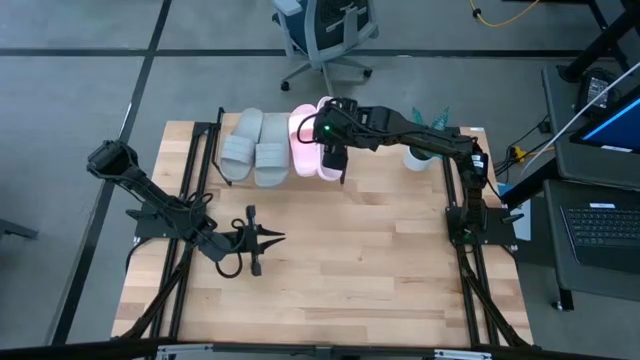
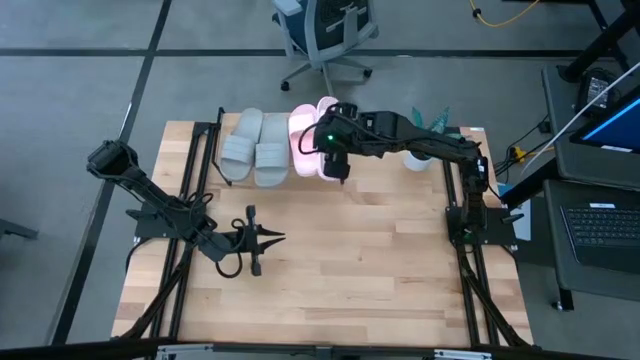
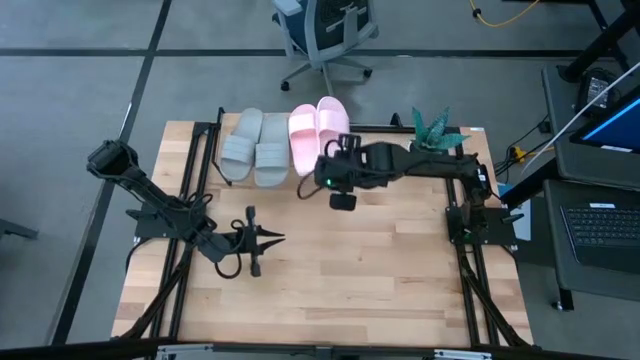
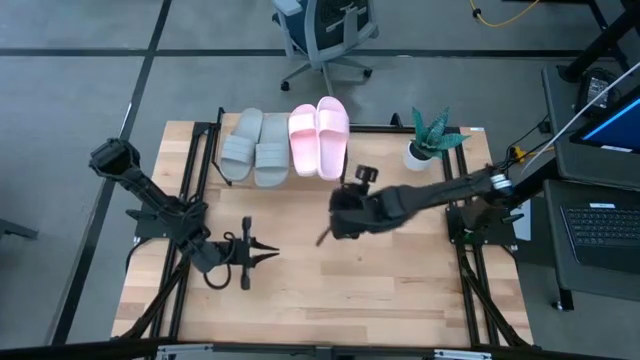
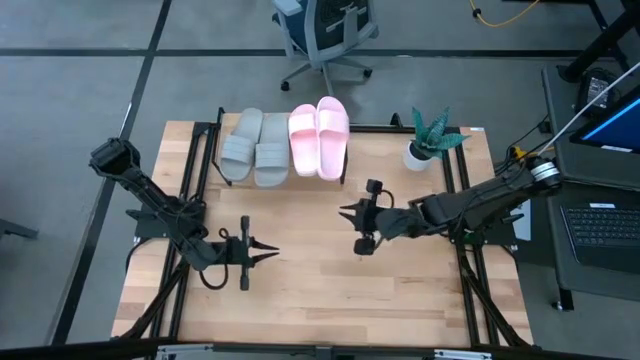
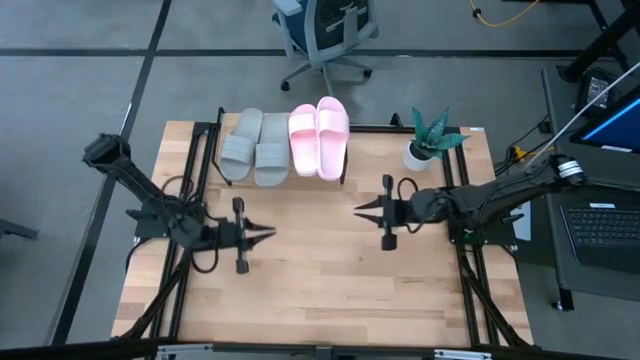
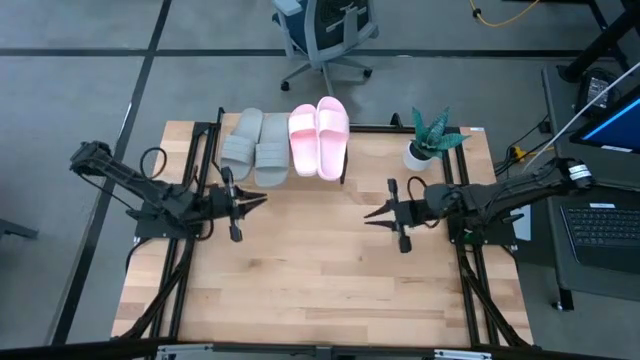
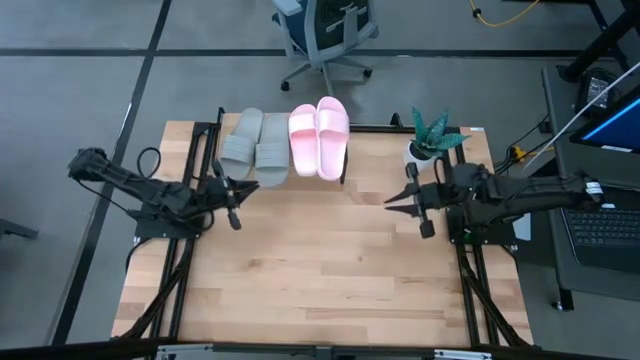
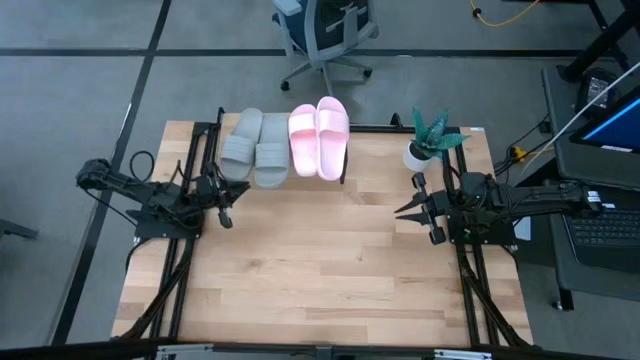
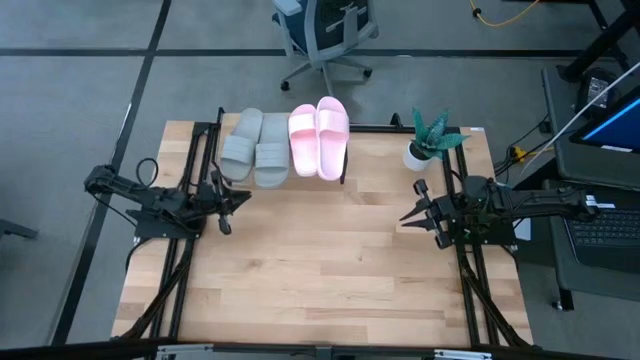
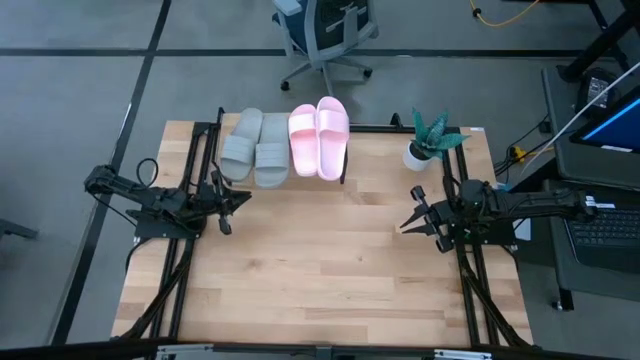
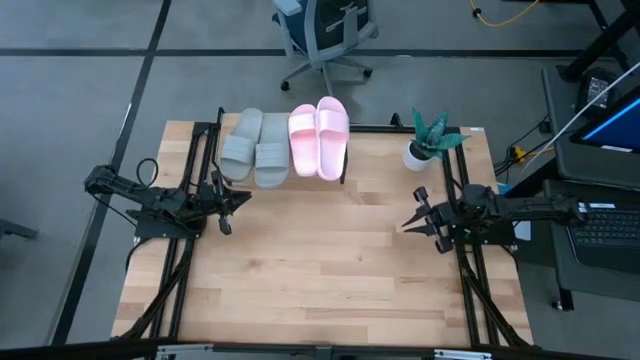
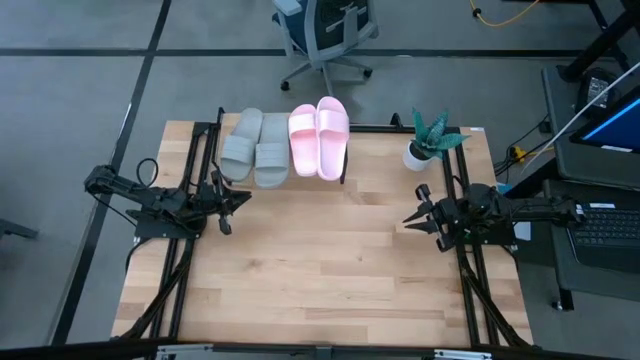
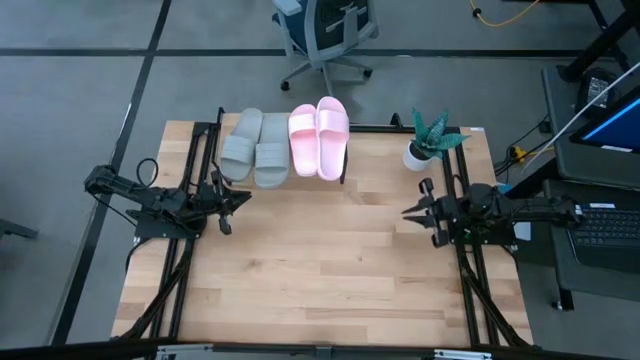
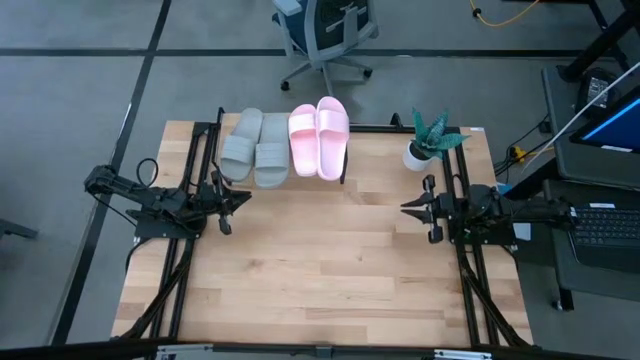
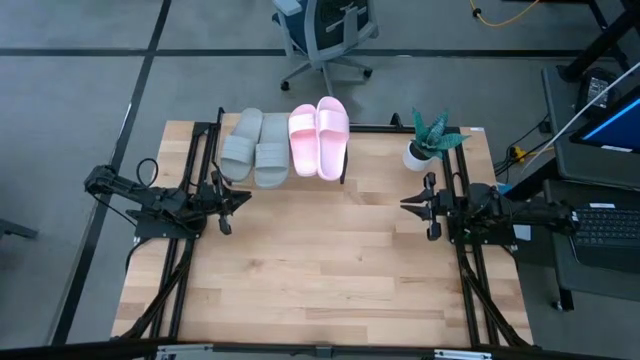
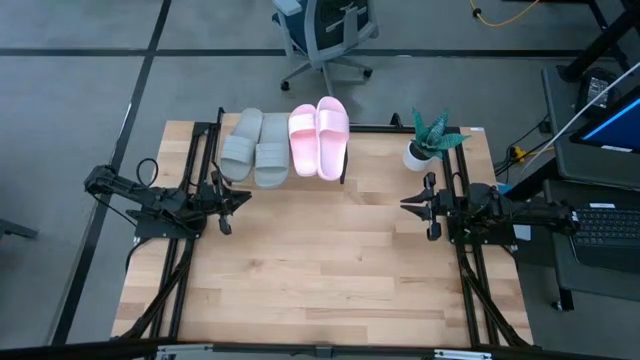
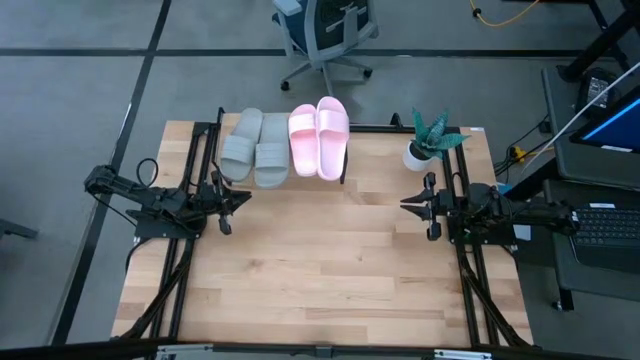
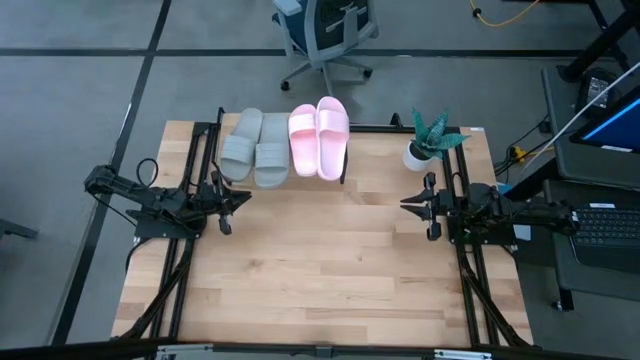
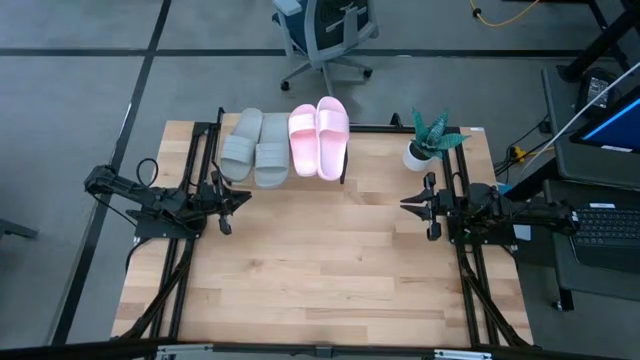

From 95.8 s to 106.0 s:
Task: Pick and place slides into the shelf
Return to Home Position

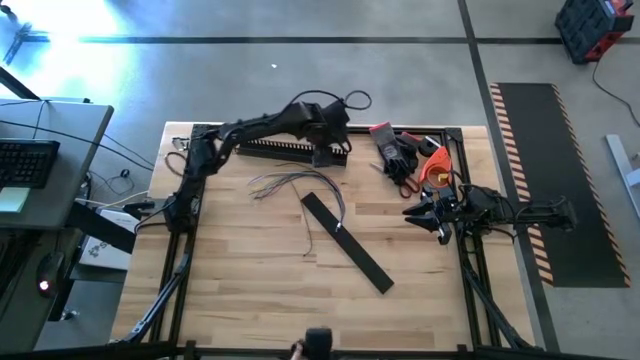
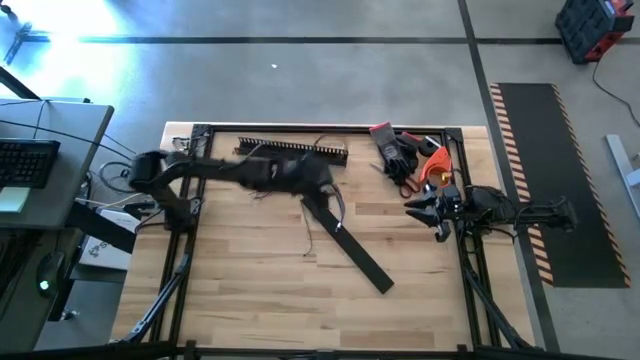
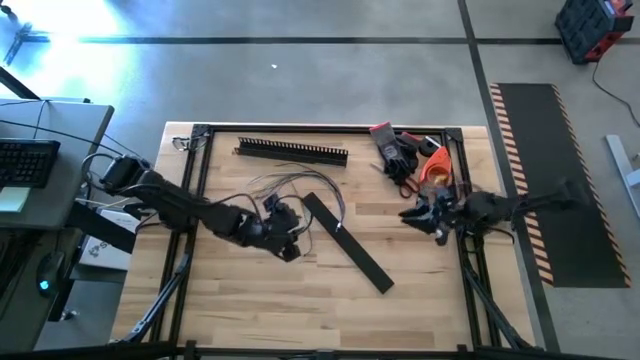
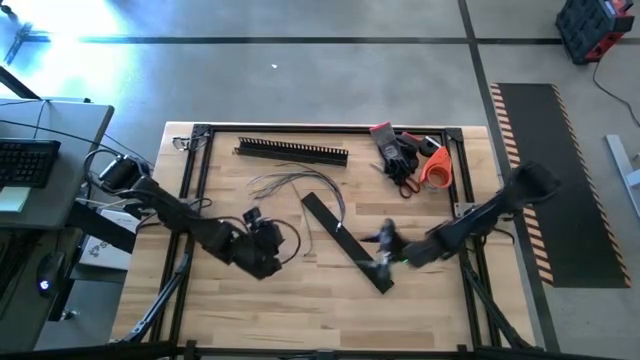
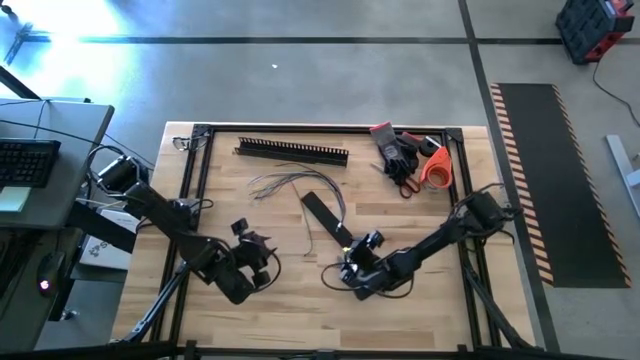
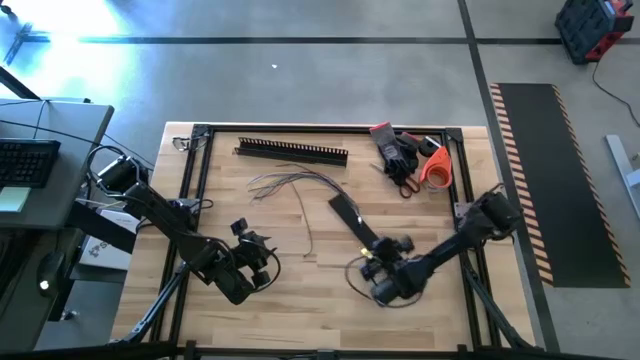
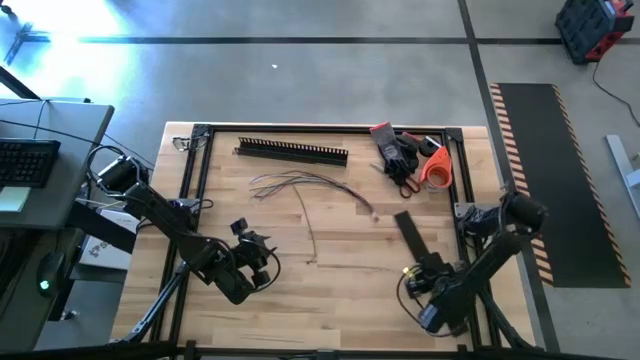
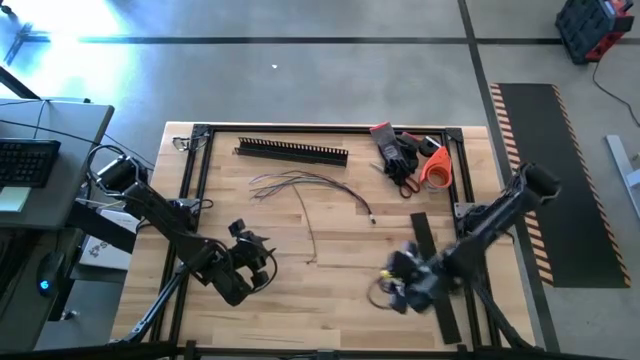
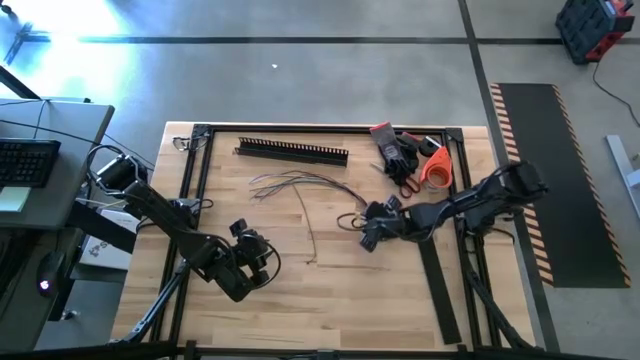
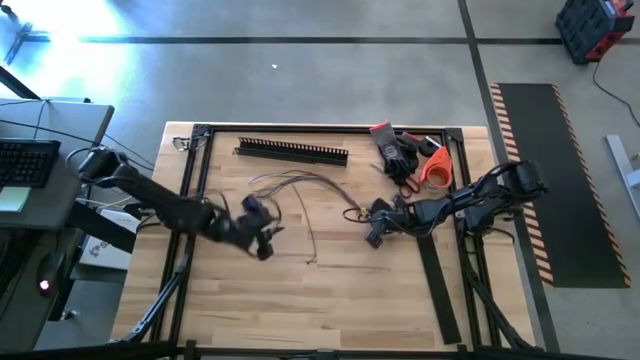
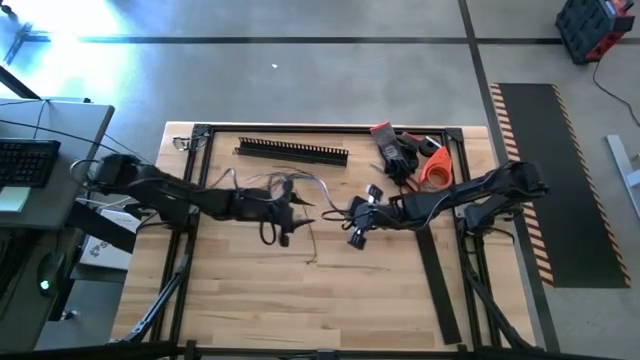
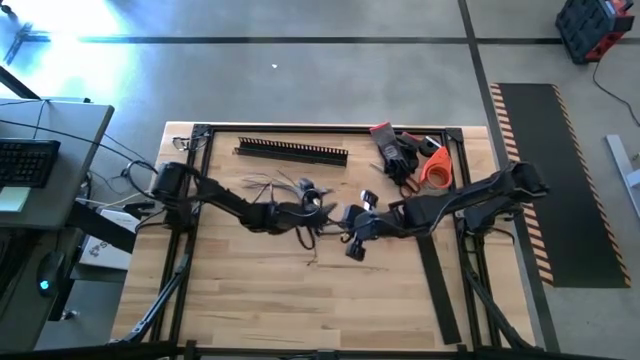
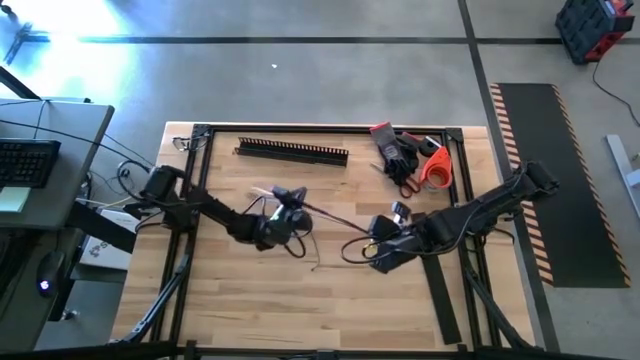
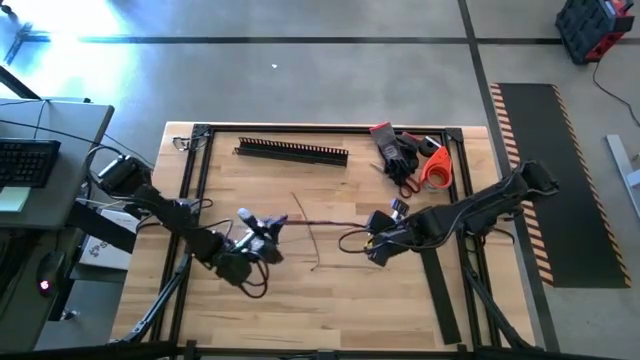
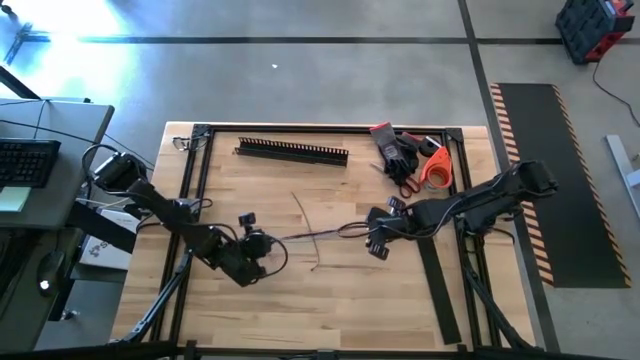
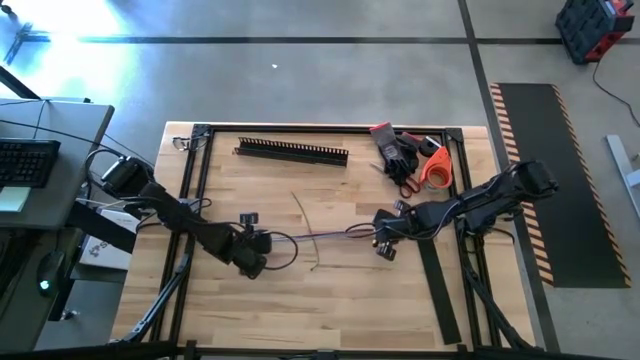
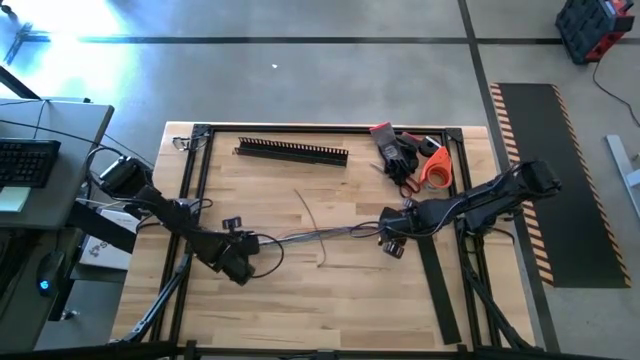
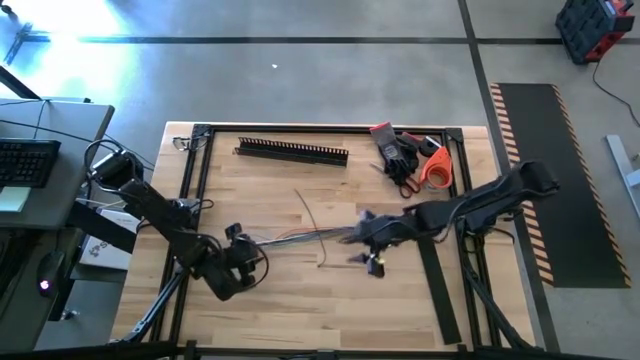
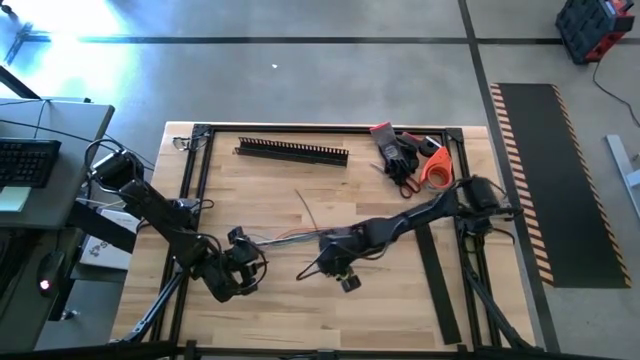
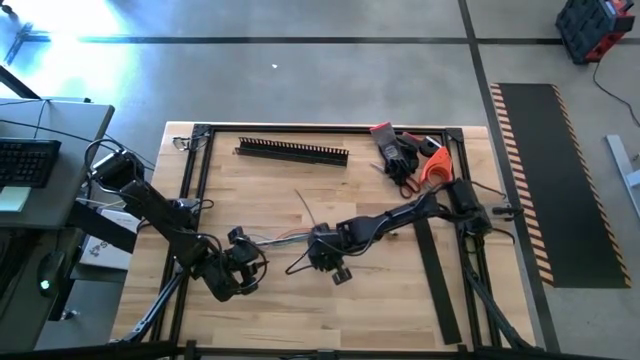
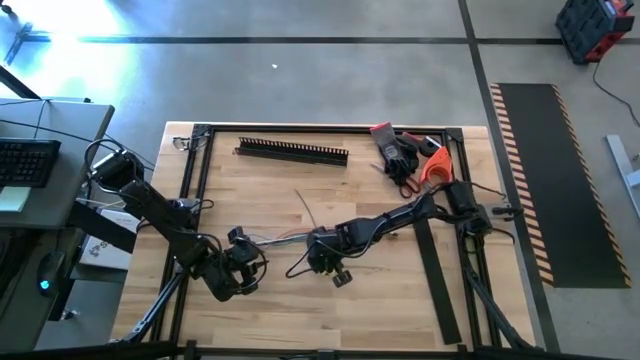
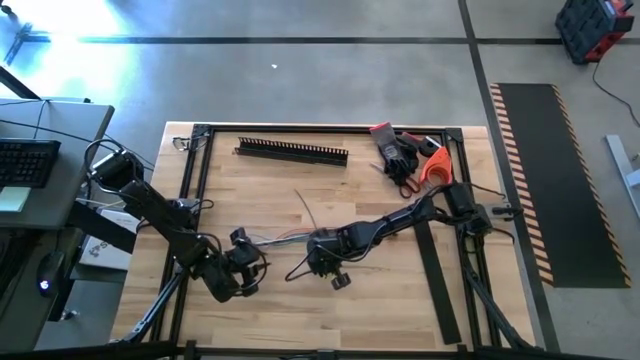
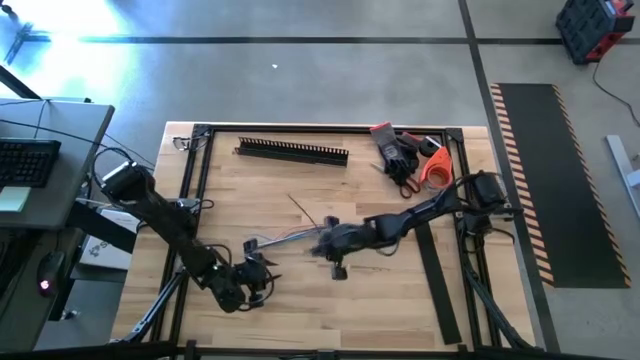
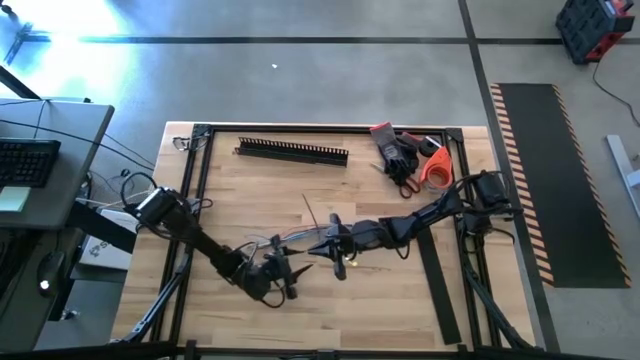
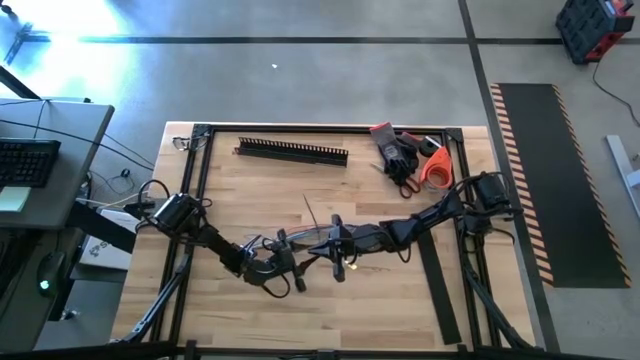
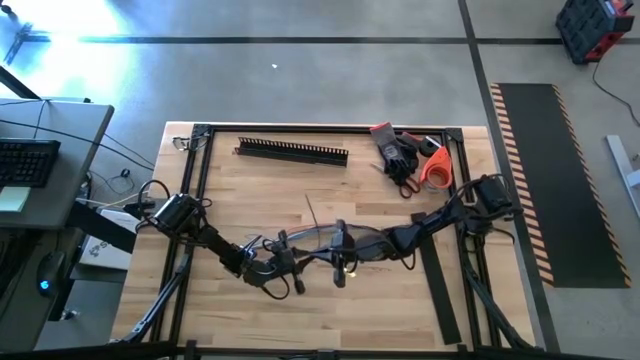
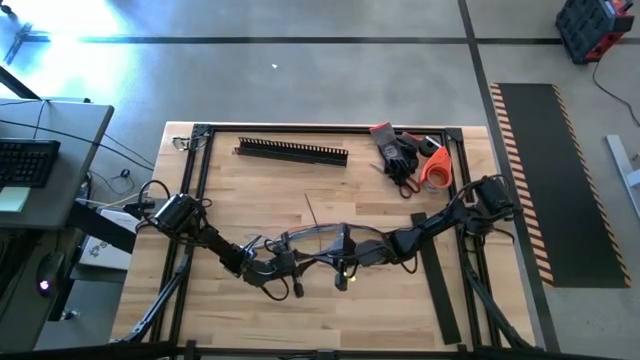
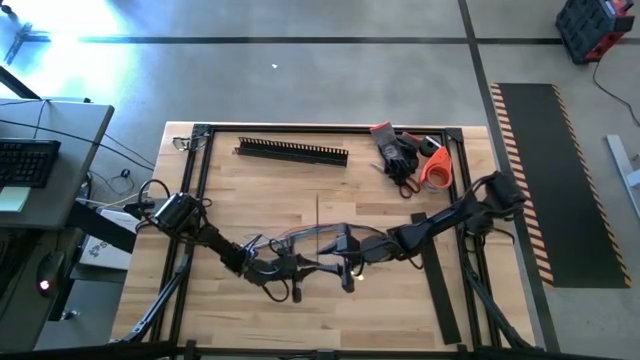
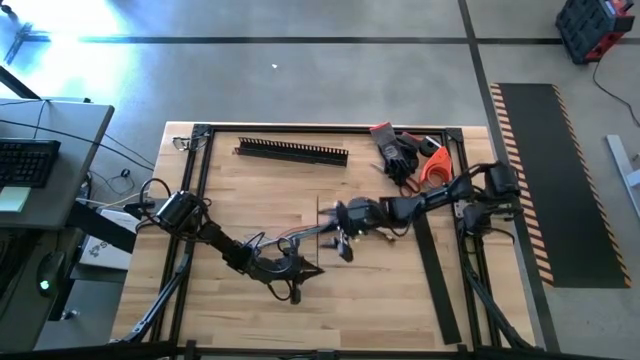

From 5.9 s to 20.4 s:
Task: Ziptie cables
Wrap the black zip tie around the cables
